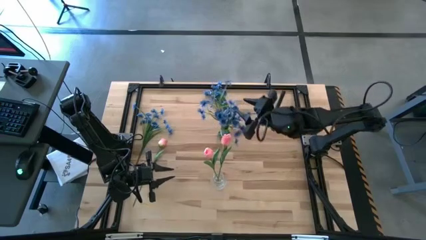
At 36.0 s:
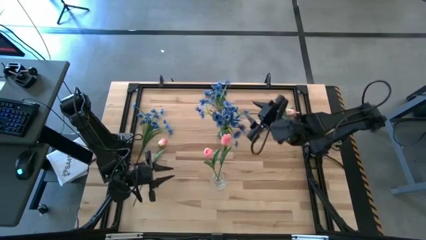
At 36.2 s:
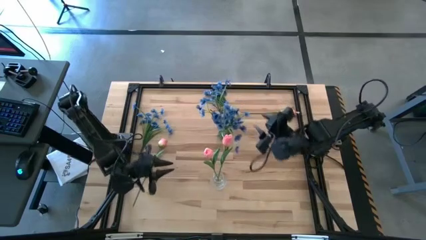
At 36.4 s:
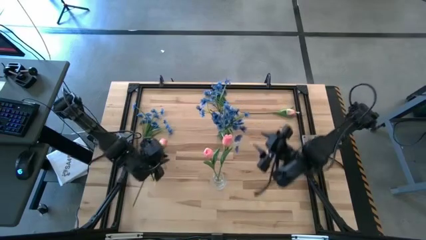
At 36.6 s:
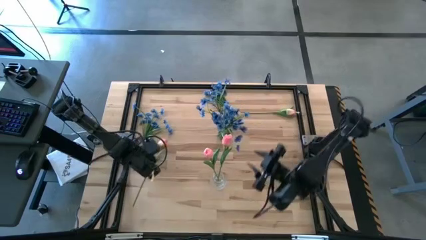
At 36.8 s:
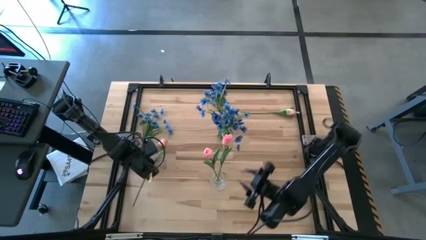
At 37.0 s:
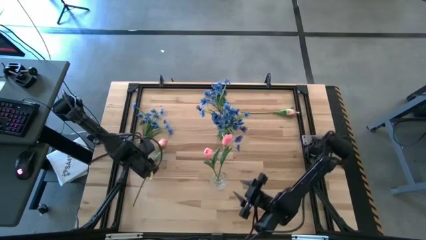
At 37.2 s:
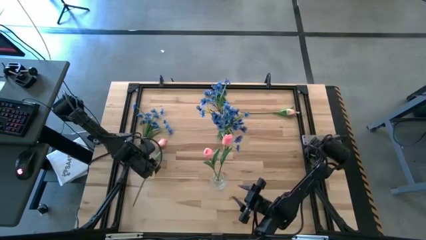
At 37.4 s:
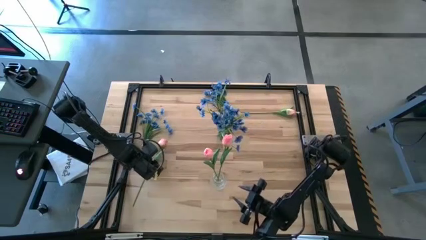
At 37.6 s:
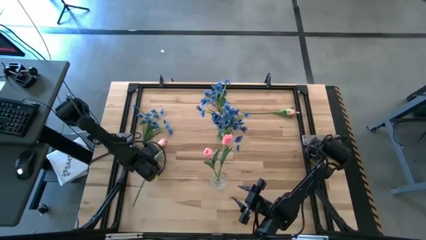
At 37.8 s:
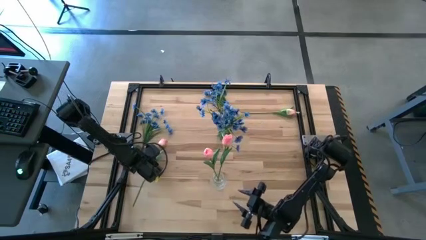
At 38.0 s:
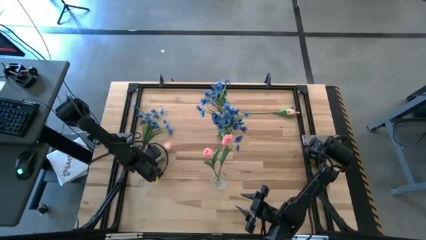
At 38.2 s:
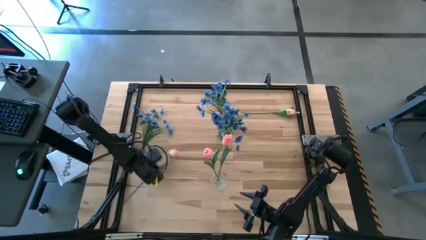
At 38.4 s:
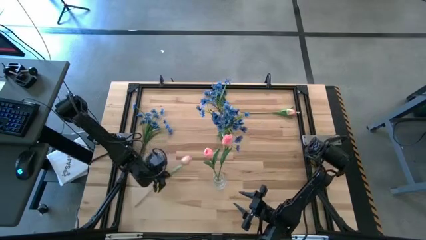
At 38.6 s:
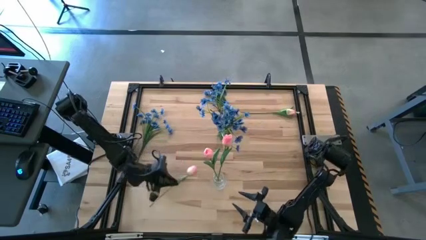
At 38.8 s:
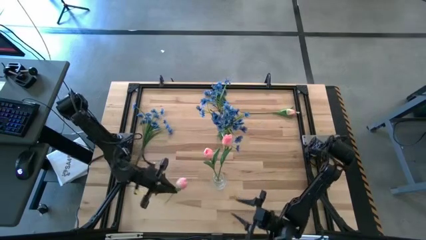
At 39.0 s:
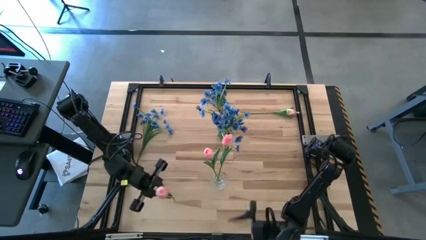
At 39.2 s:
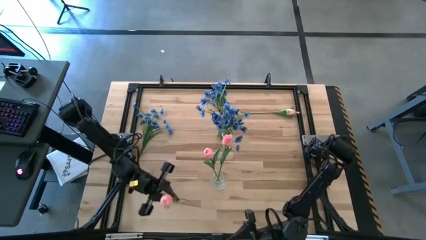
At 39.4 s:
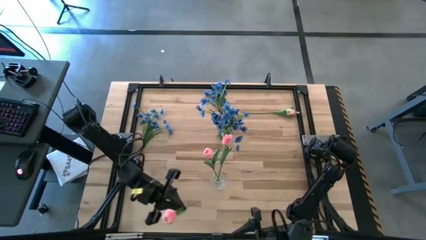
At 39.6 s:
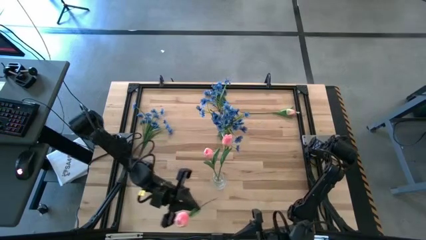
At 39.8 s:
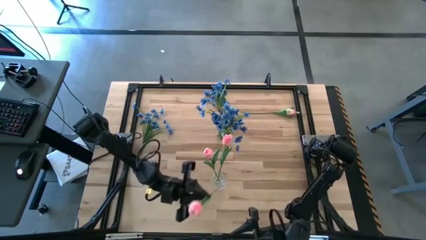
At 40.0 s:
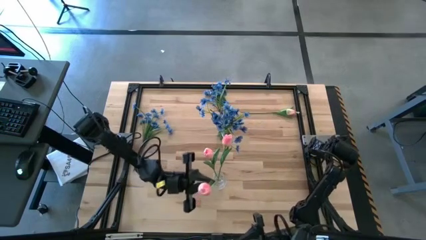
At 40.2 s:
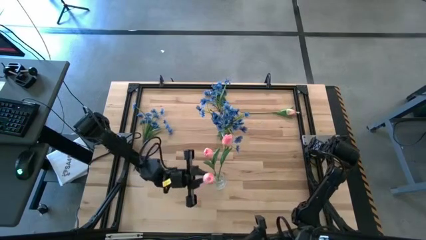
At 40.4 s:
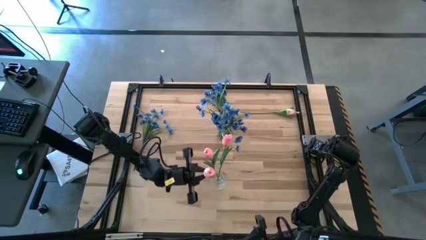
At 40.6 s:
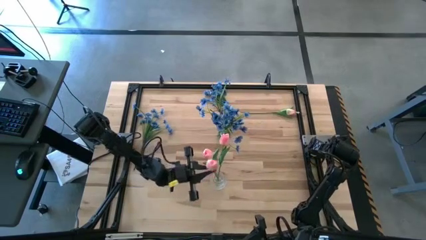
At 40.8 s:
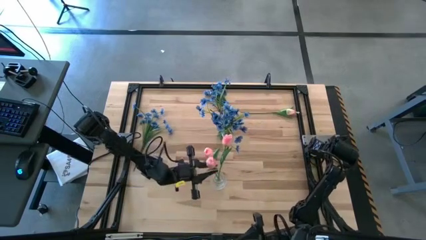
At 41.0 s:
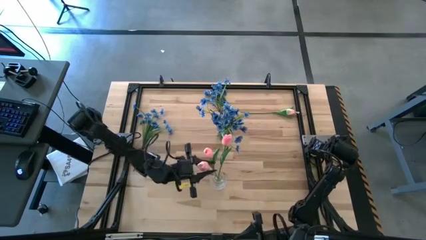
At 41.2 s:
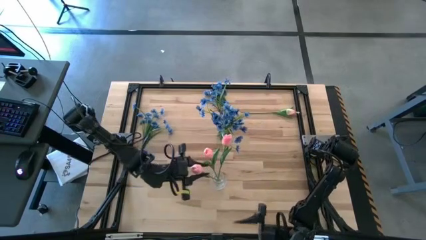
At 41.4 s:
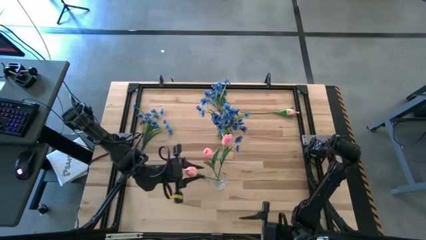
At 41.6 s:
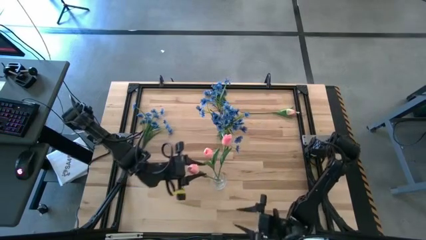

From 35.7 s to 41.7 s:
Task: Sort flowers into vase by color
Put the bottom pink tulip into the transparent vase

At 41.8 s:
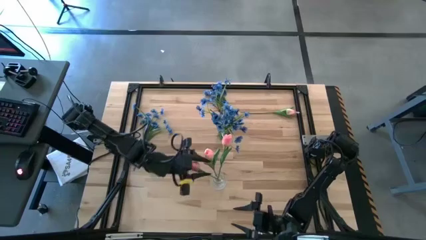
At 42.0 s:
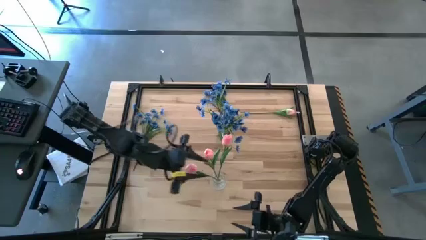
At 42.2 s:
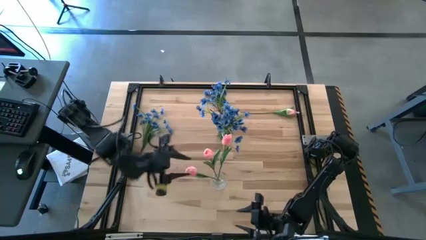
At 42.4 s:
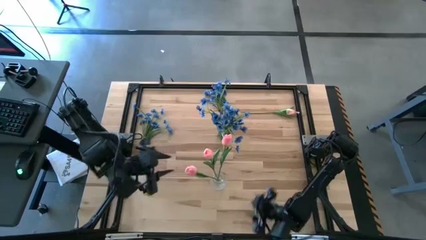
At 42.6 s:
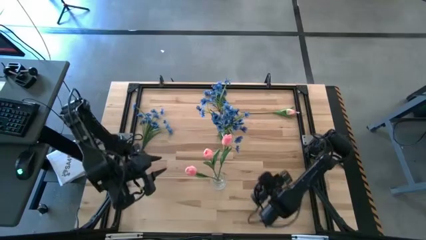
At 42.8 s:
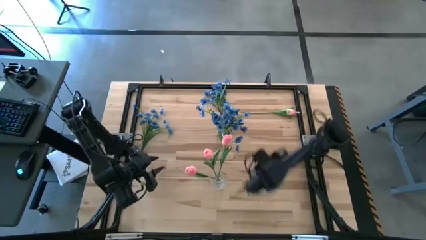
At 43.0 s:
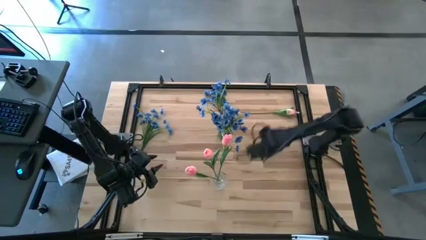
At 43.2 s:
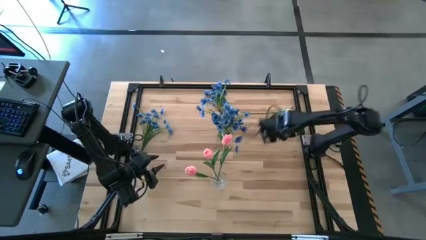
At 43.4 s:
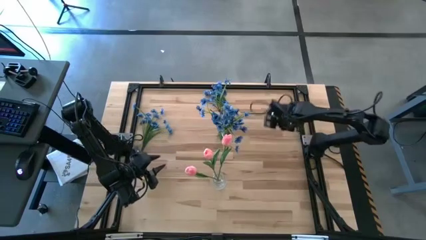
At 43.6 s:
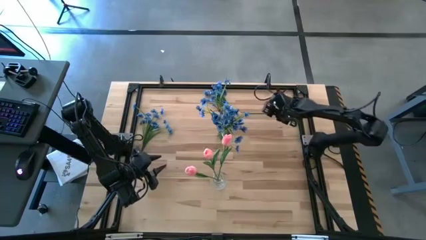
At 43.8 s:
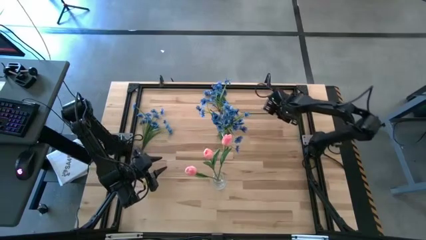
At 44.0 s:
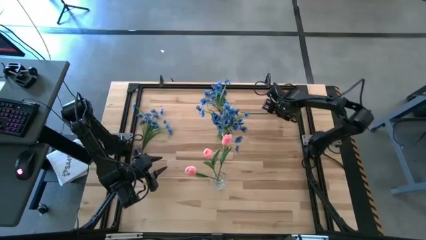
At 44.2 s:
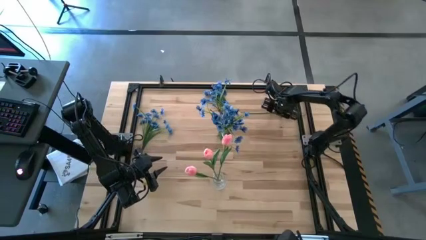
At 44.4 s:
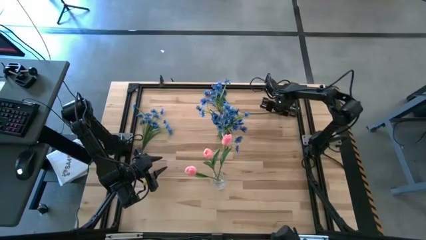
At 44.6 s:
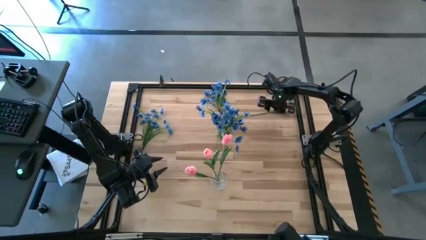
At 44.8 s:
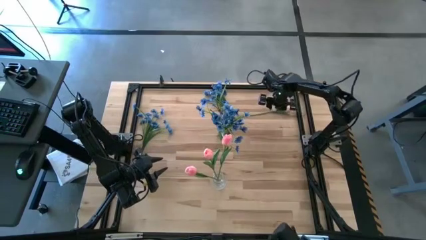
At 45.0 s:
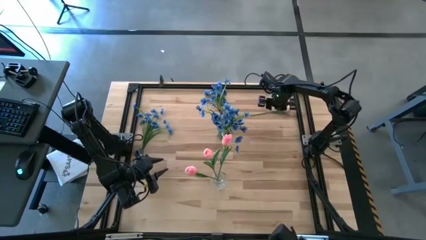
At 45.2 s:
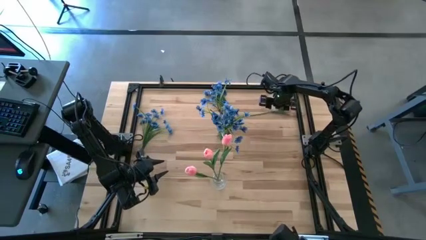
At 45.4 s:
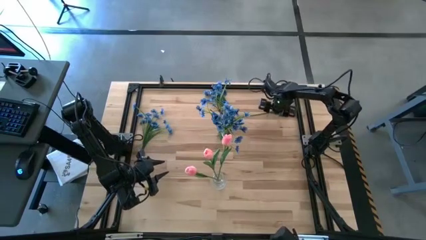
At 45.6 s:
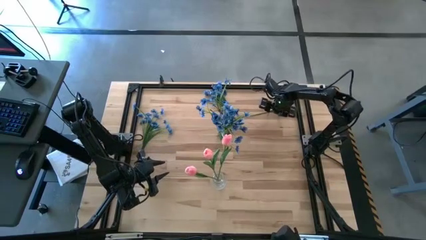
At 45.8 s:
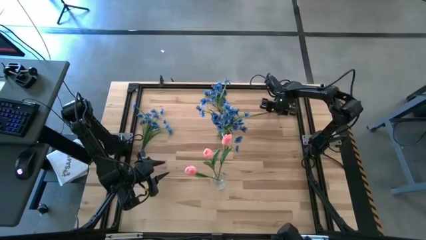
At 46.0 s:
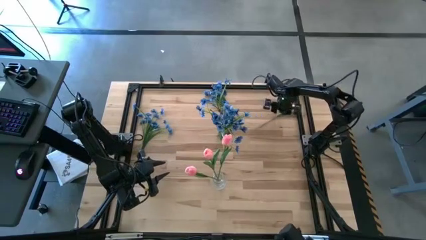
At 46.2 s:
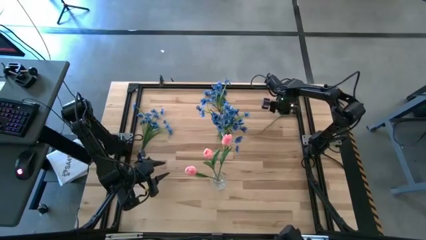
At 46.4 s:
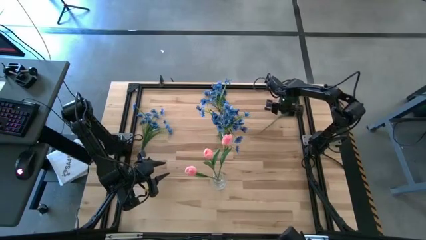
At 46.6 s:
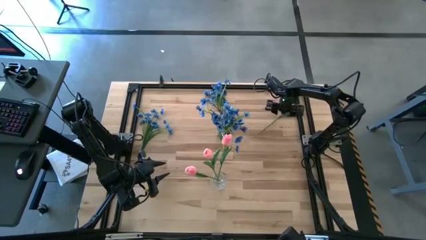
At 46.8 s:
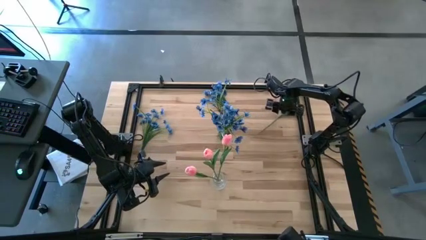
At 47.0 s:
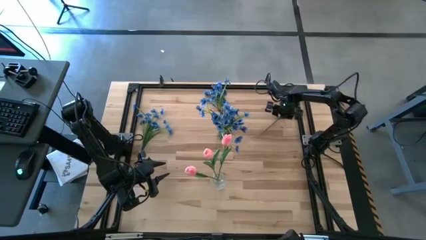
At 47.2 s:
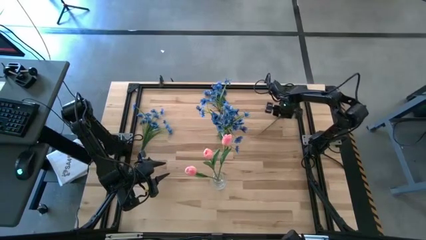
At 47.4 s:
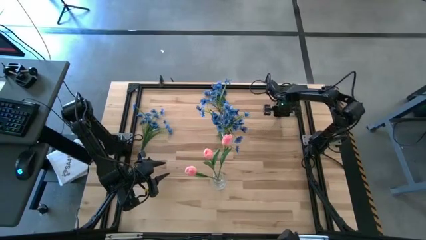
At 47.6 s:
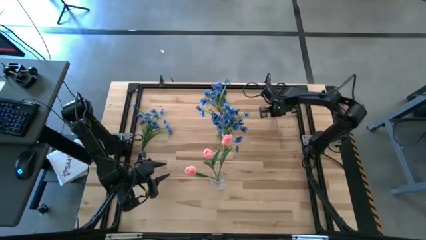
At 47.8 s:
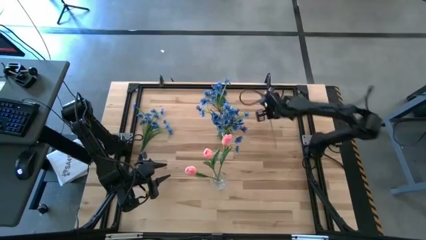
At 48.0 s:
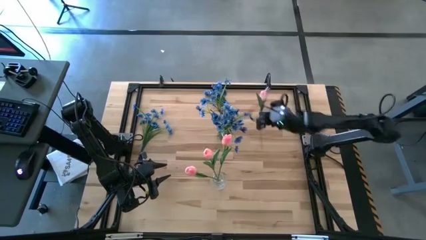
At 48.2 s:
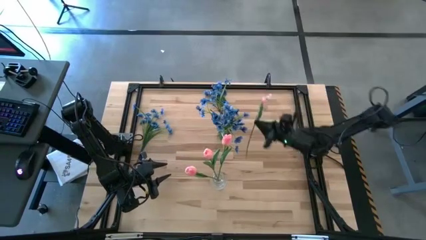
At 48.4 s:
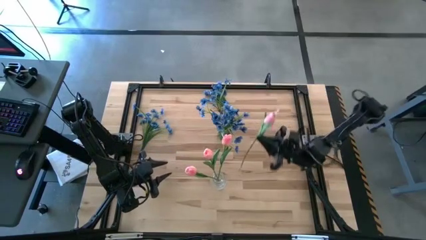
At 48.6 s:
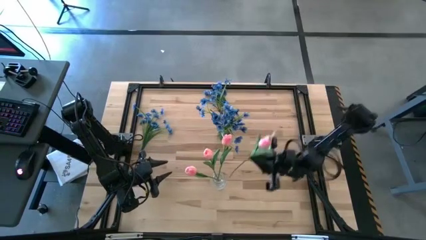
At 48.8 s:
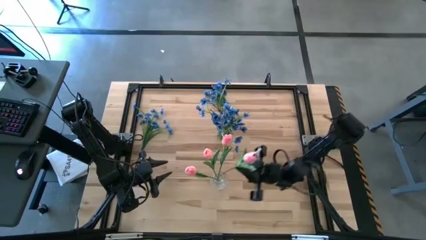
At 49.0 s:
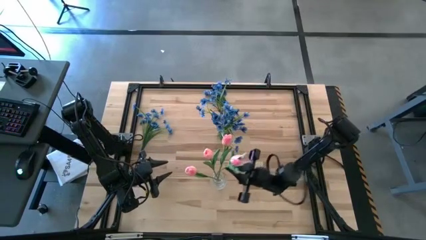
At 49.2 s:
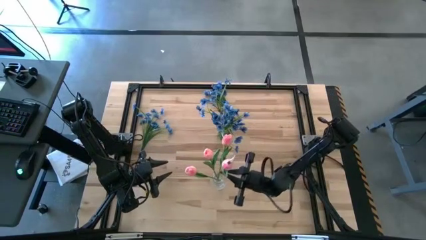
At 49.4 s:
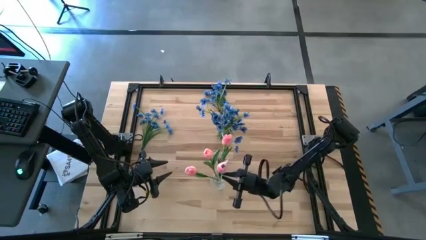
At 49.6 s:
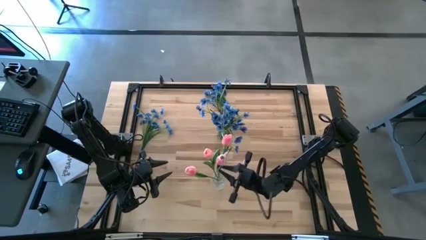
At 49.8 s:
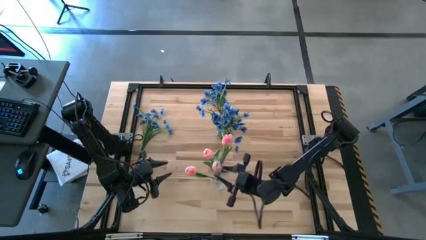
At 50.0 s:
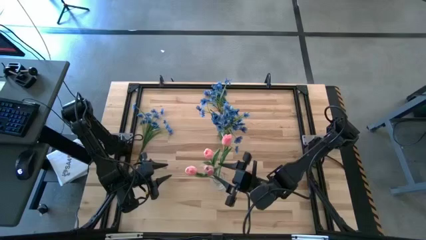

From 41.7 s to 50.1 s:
Put the pink tulip into the transparent vase
